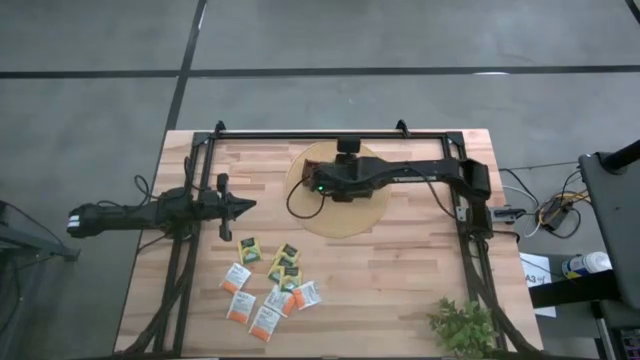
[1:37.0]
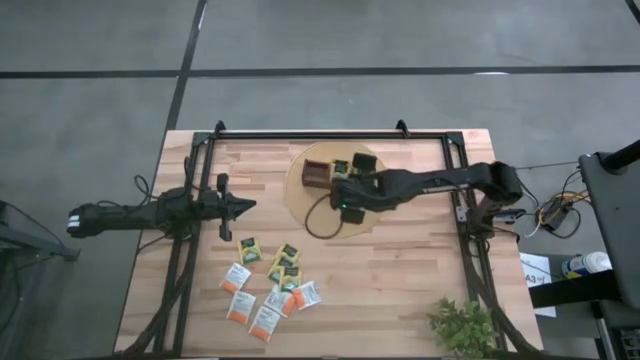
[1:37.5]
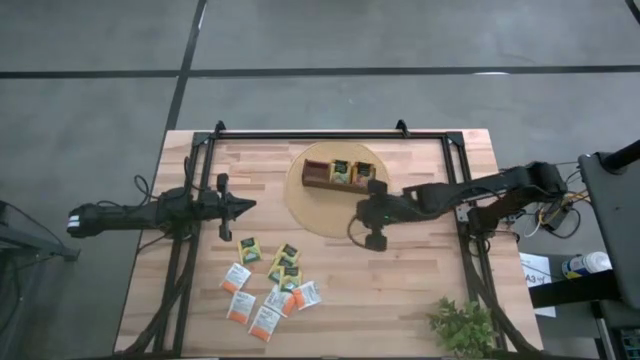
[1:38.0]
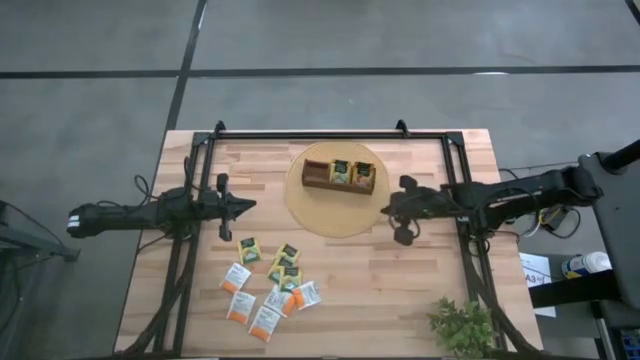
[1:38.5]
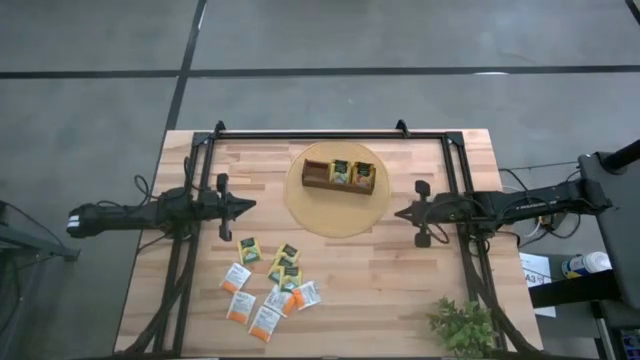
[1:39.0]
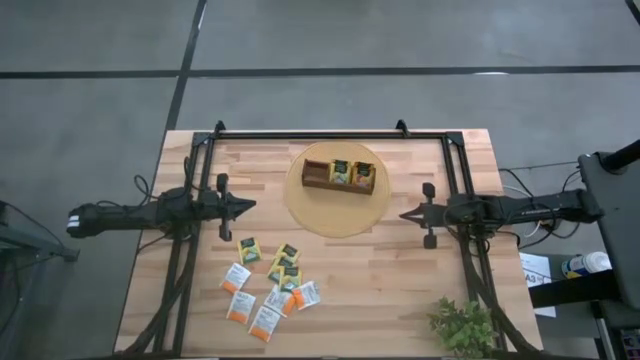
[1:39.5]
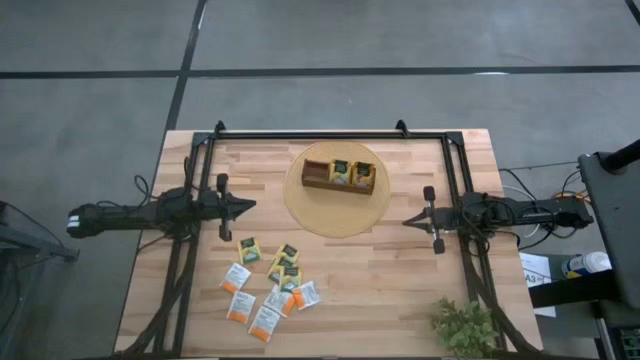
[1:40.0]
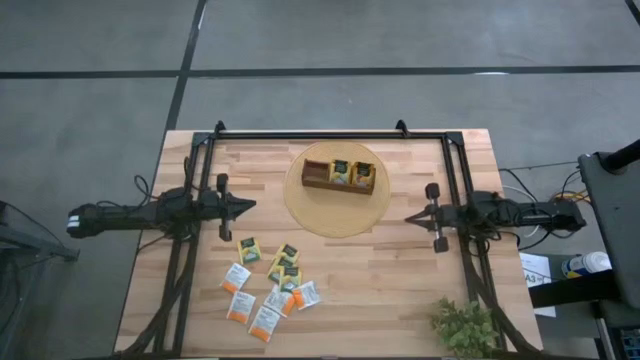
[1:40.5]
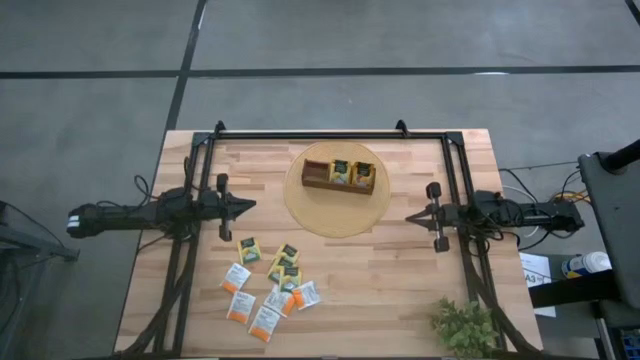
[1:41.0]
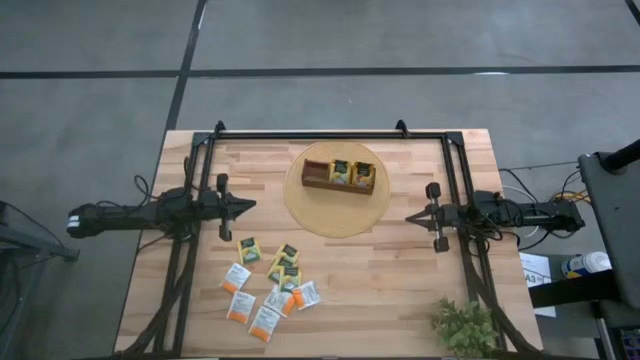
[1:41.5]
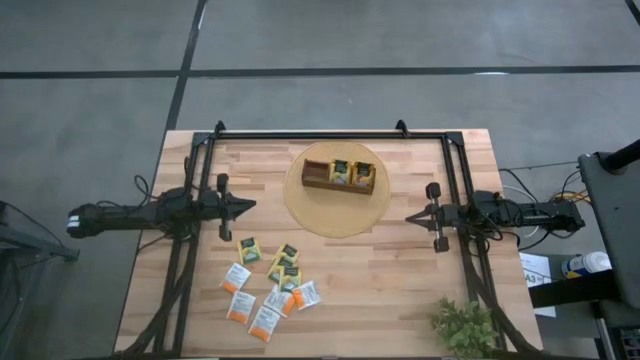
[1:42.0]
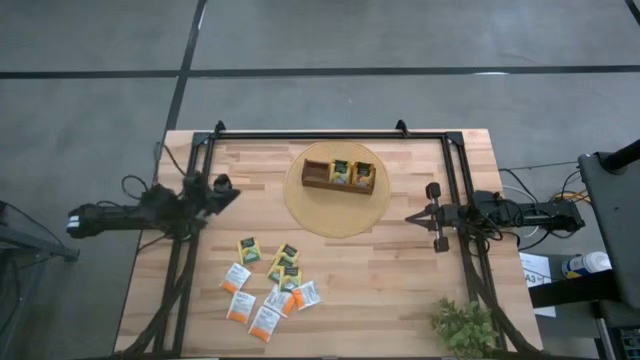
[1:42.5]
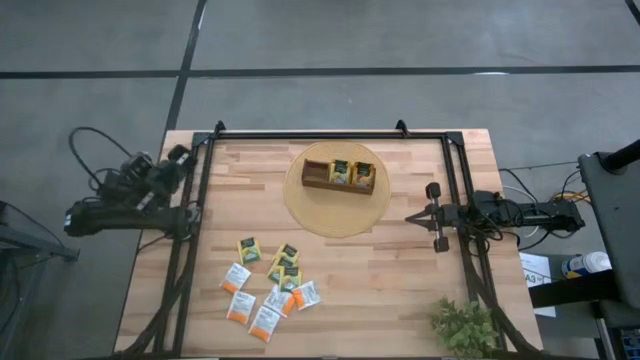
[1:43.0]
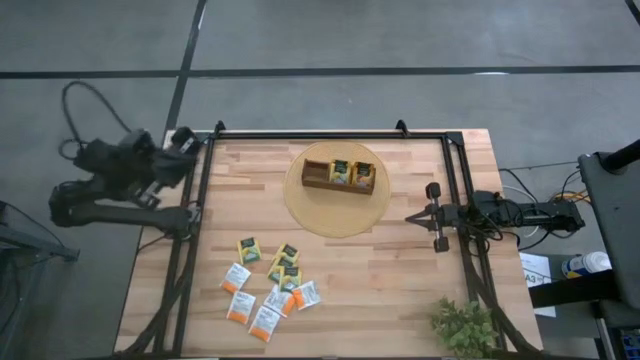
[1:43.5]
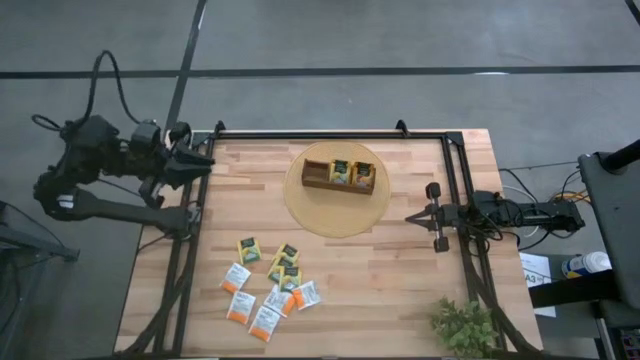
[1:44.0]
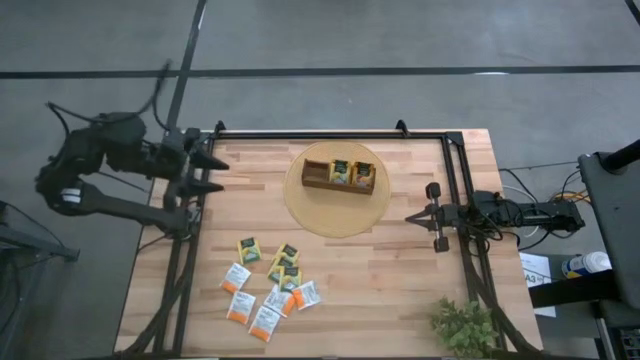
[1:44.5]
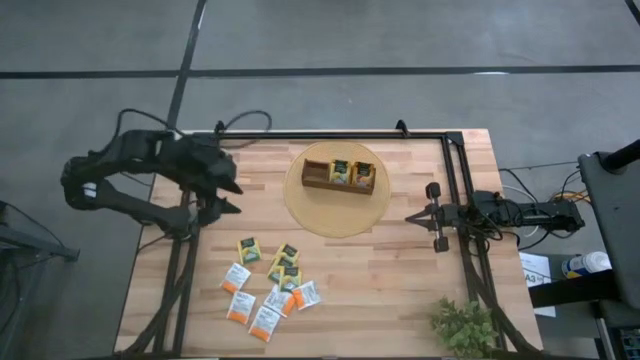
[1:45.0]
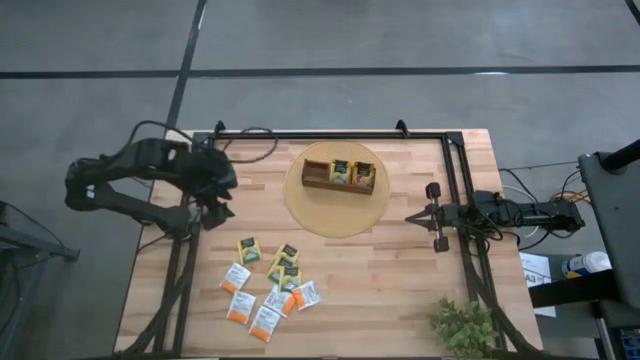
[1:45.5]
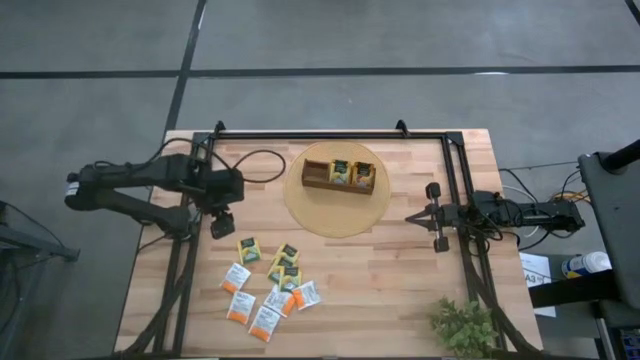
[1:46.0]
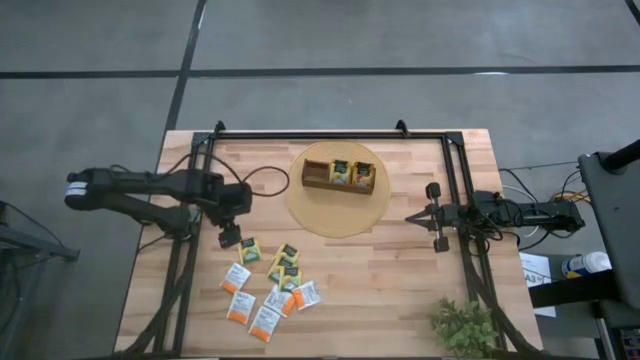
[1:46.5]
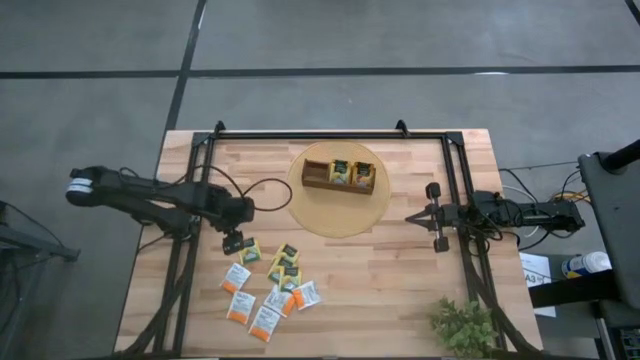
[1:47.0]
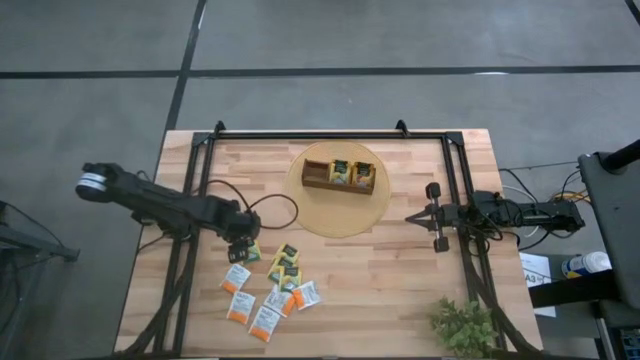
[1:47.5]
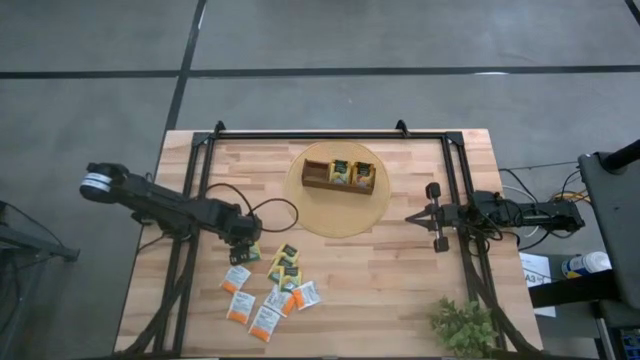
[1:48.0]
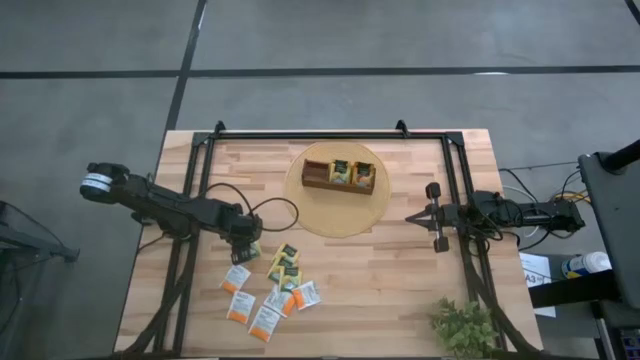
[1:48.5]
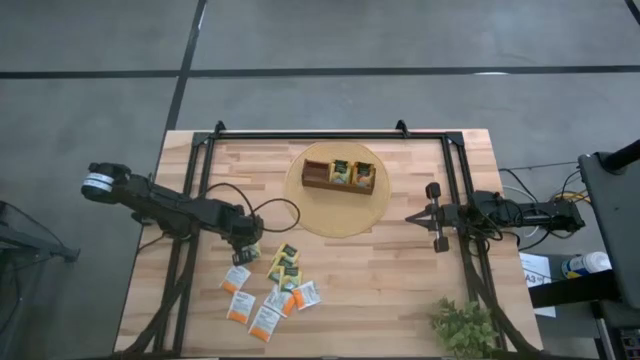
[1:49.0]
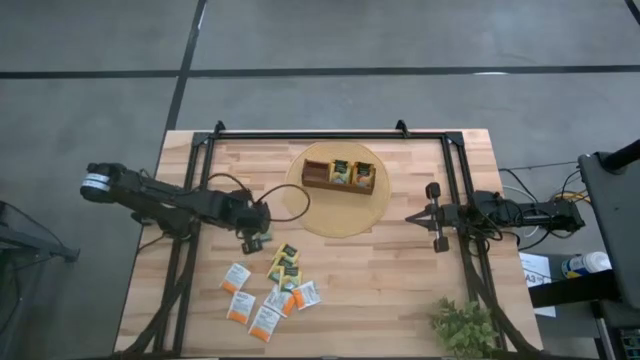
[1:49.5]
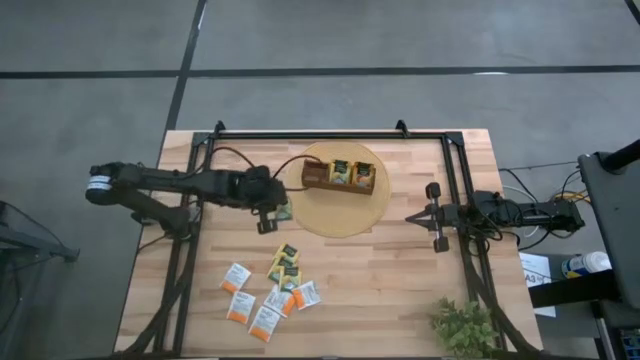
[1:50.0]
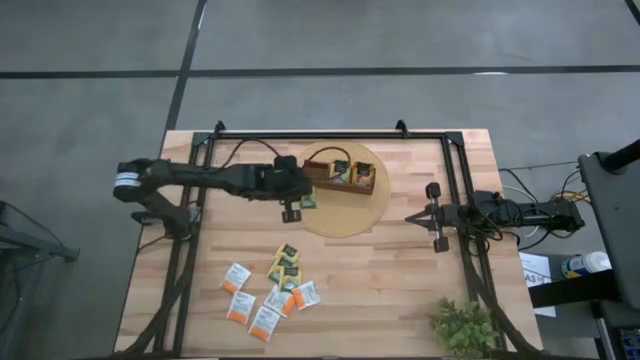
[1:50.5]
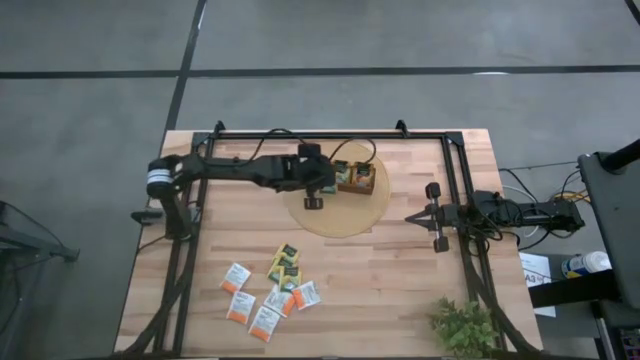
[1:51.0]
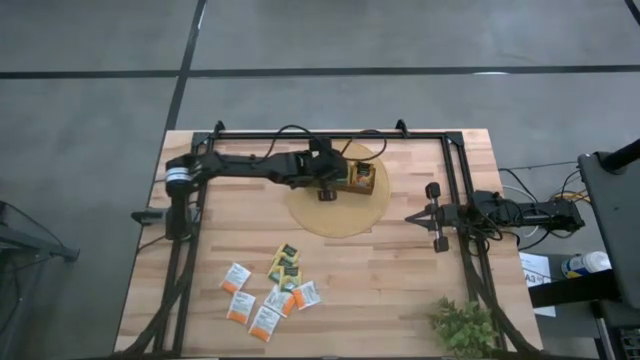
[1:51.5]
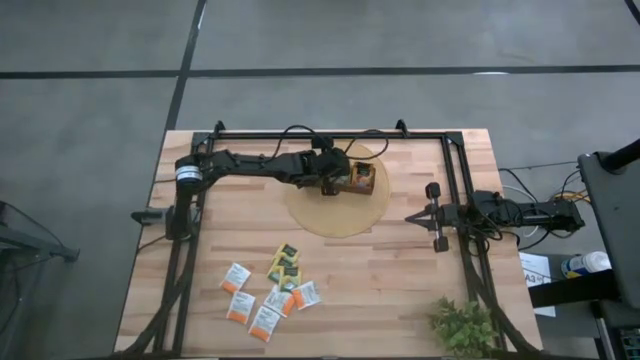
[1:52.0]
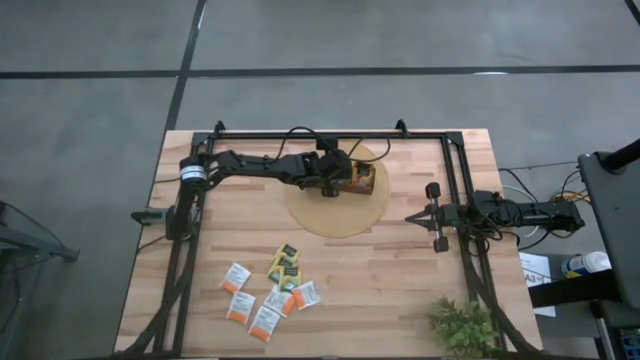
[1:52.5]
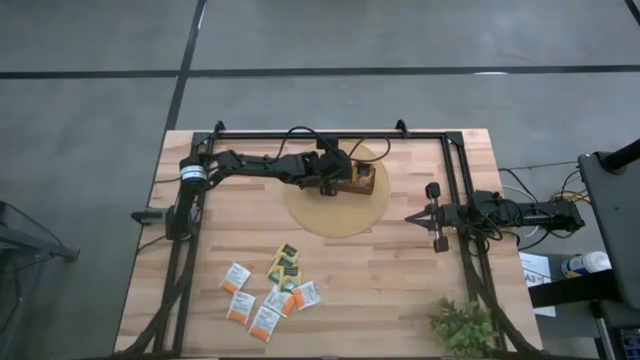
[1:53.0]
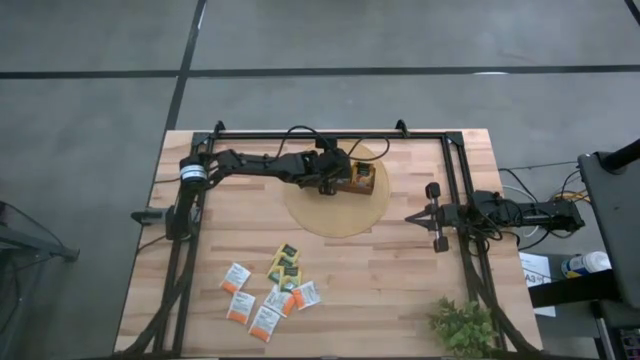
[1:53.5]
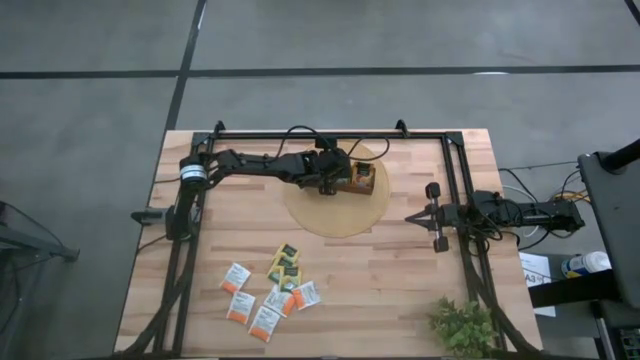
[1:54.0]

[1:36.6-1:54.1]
Task: Pick & Place Tea
Put the green tea bag into the middle section of wooden organizer

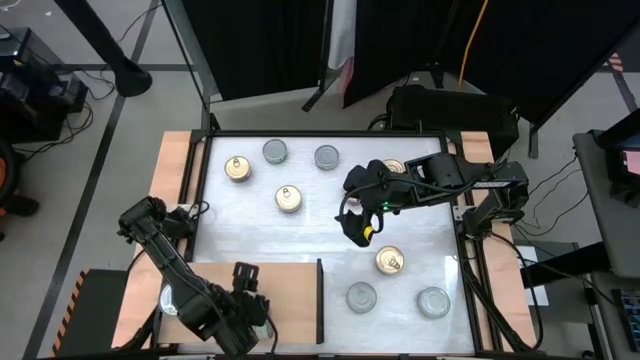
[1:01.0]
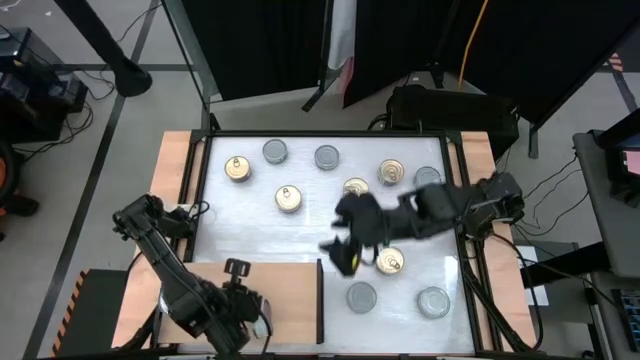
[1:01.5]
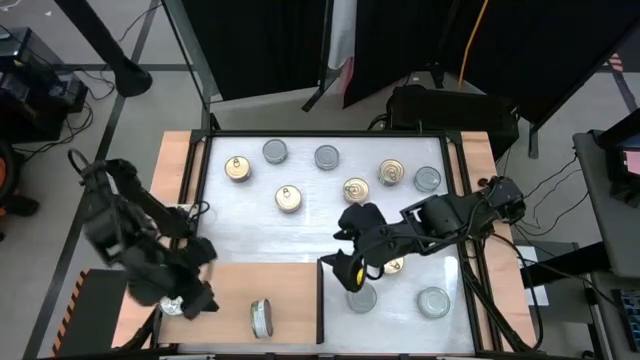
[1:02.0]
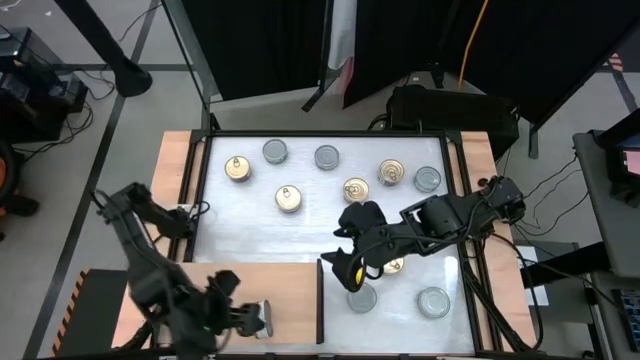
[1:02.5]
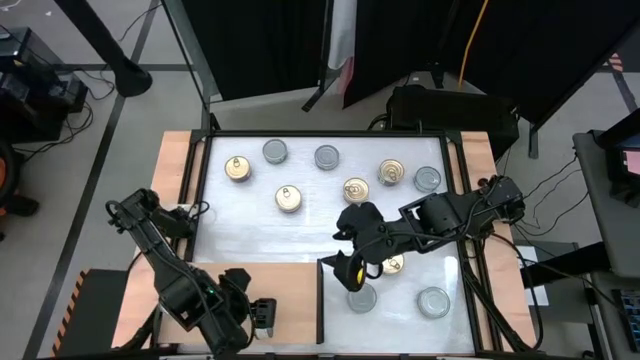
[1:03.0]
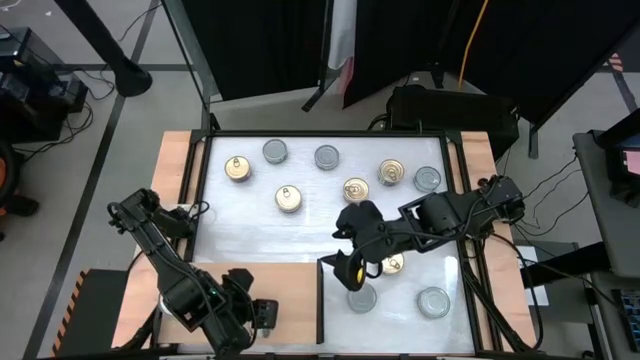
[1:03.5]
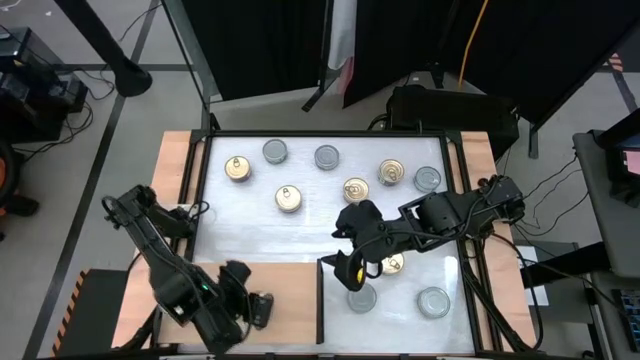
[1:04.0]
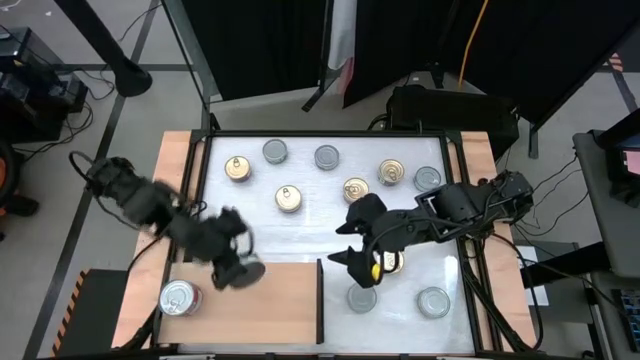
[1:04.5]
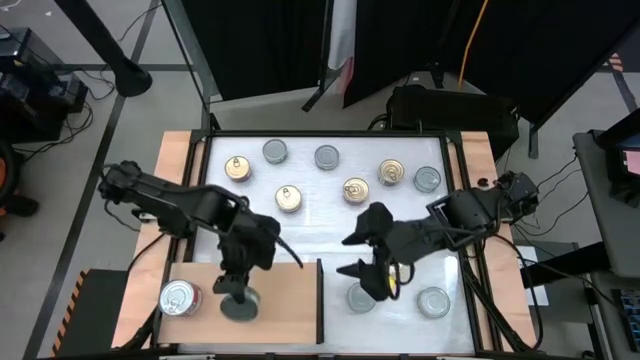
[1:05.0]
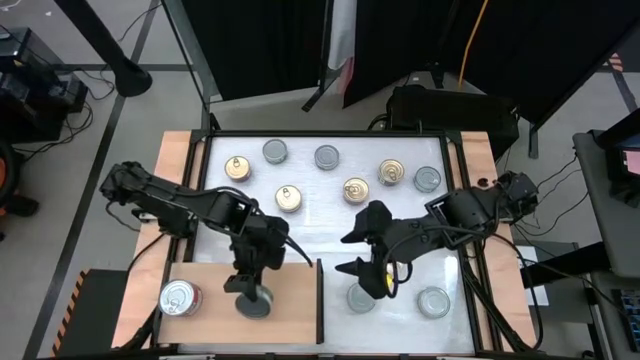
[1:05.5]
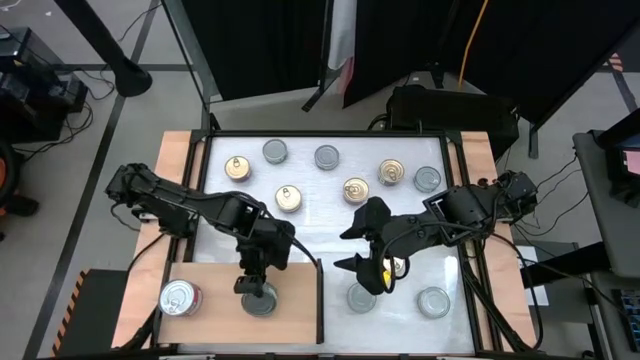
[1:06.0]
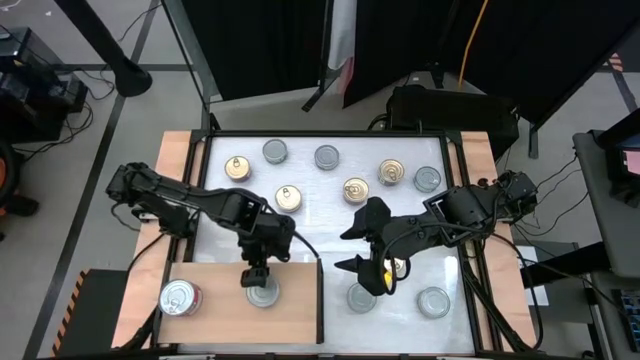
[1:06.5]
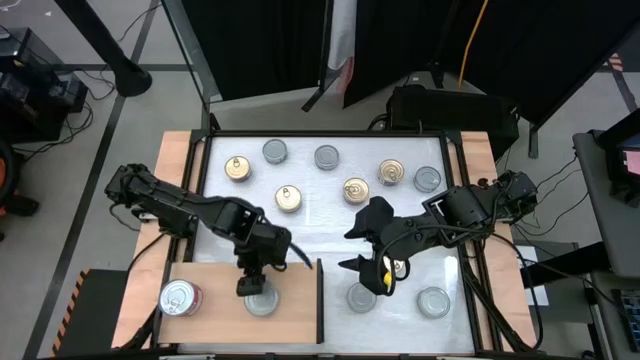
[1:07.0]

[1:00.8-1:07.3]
Task: Stack canned seafood by type on shelf
Put the green white tuna can on the shelf
